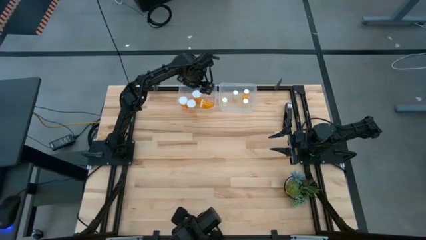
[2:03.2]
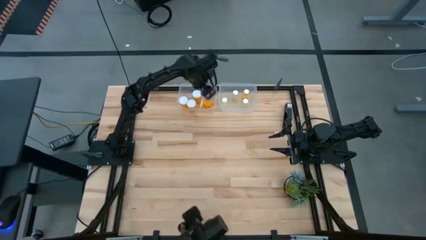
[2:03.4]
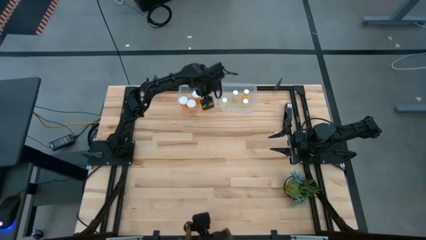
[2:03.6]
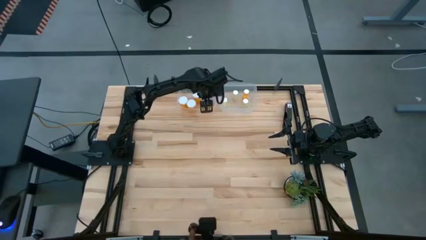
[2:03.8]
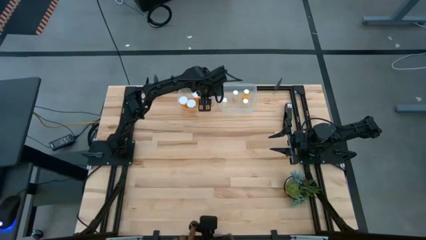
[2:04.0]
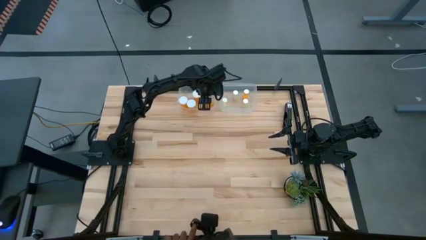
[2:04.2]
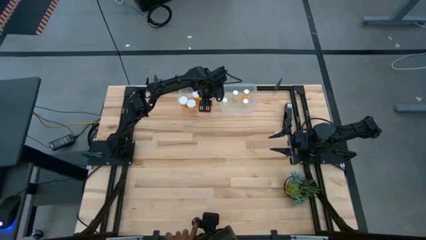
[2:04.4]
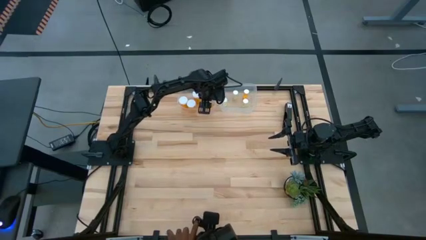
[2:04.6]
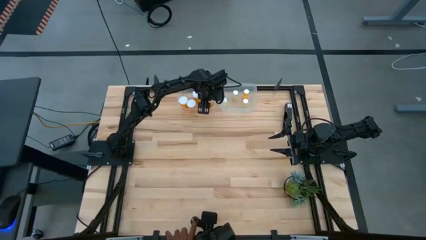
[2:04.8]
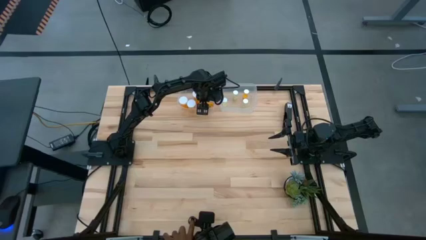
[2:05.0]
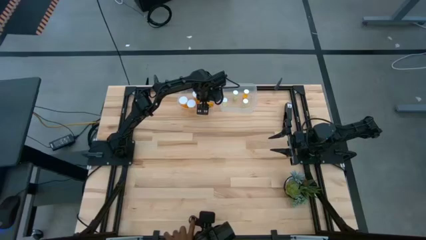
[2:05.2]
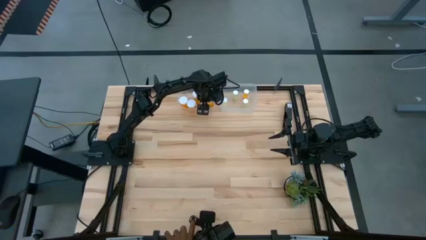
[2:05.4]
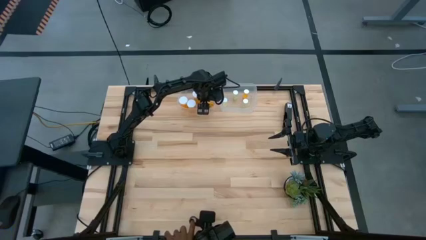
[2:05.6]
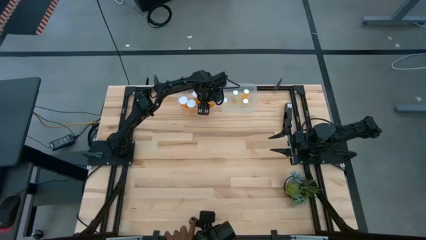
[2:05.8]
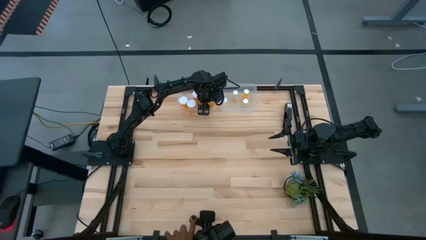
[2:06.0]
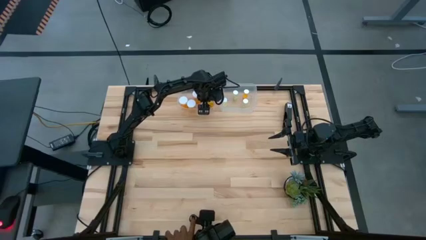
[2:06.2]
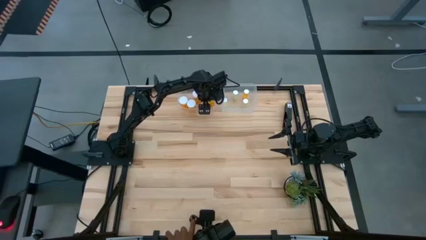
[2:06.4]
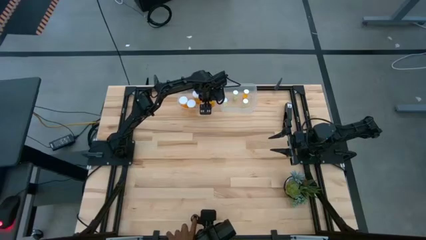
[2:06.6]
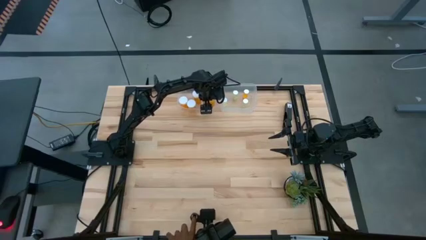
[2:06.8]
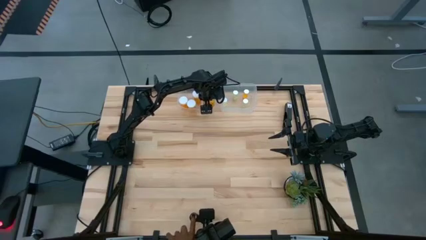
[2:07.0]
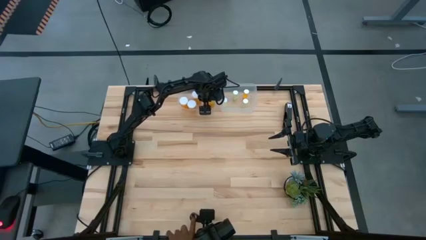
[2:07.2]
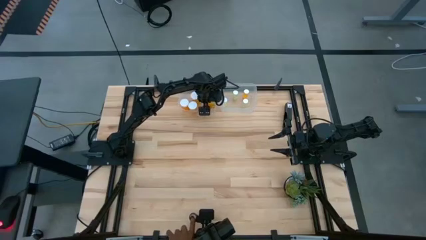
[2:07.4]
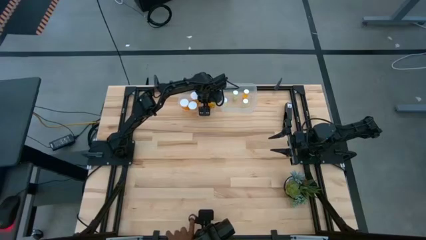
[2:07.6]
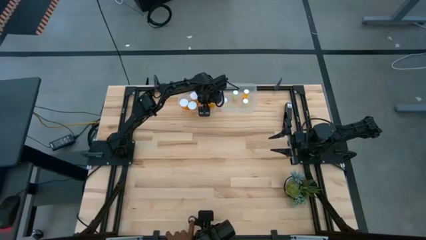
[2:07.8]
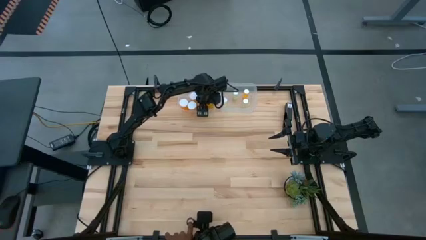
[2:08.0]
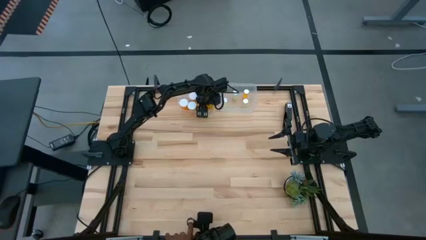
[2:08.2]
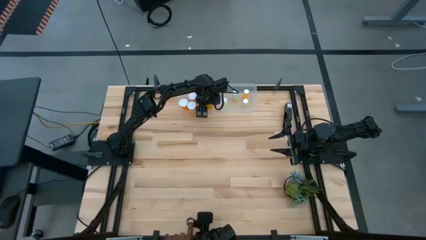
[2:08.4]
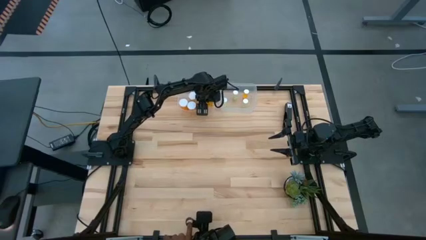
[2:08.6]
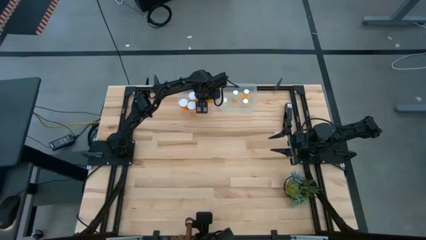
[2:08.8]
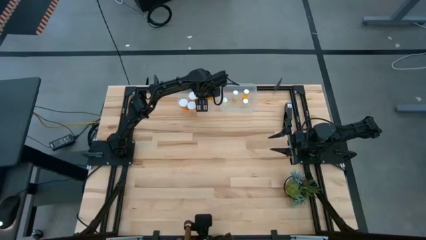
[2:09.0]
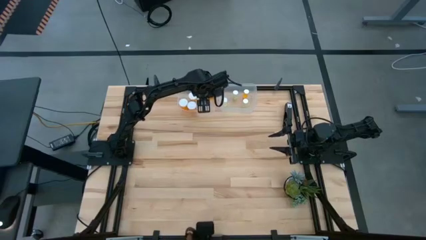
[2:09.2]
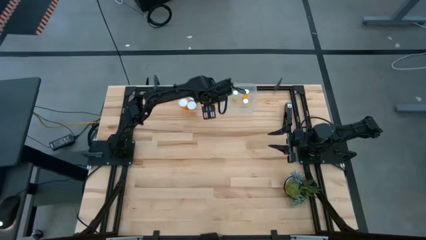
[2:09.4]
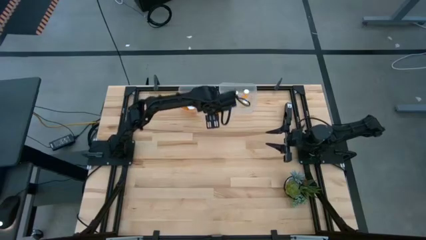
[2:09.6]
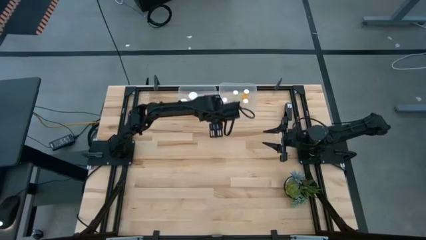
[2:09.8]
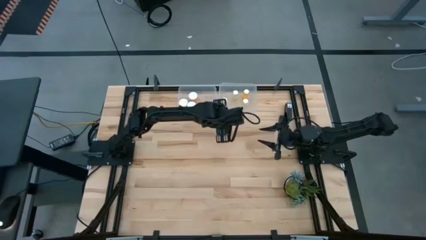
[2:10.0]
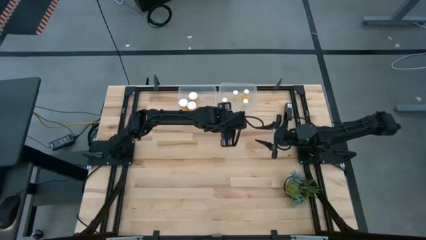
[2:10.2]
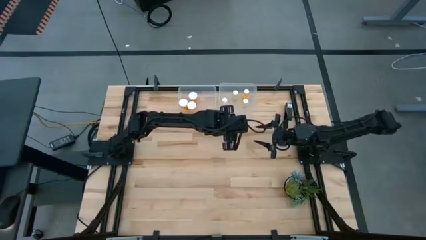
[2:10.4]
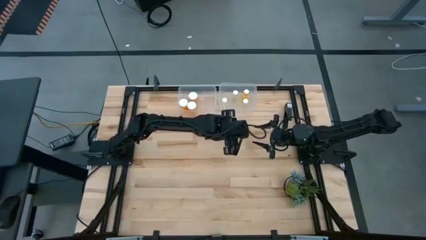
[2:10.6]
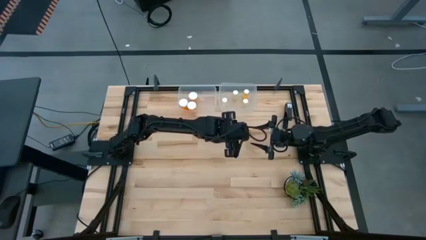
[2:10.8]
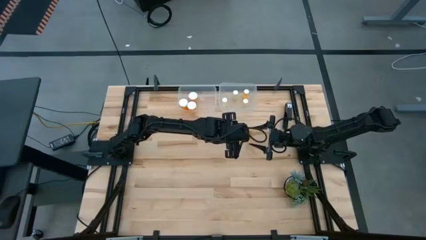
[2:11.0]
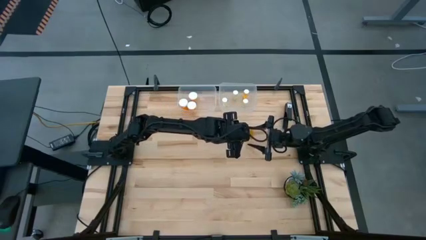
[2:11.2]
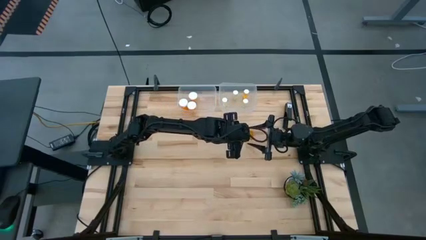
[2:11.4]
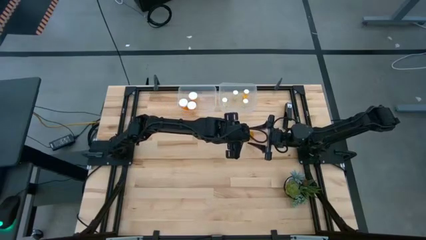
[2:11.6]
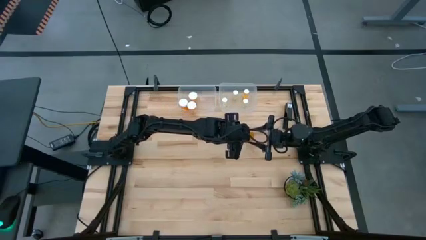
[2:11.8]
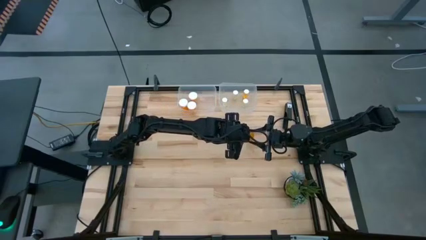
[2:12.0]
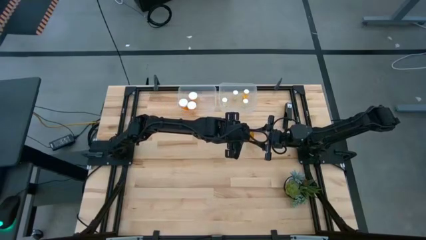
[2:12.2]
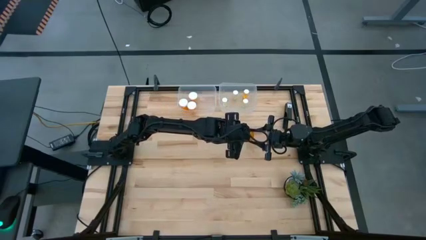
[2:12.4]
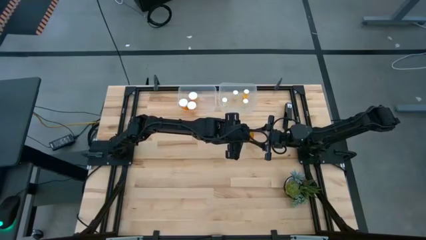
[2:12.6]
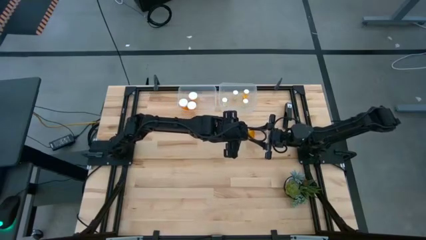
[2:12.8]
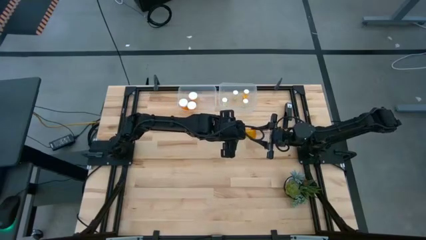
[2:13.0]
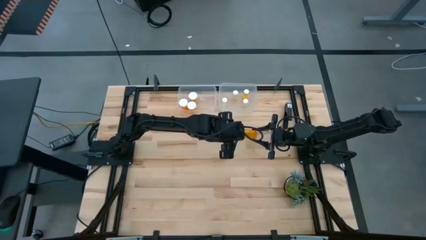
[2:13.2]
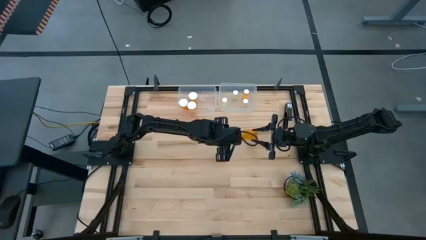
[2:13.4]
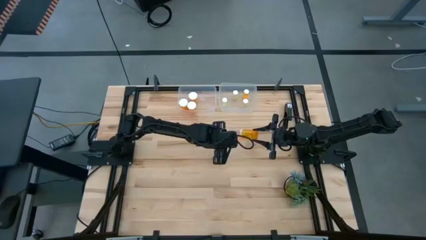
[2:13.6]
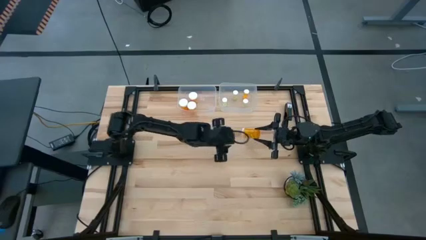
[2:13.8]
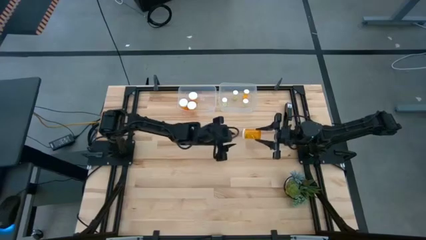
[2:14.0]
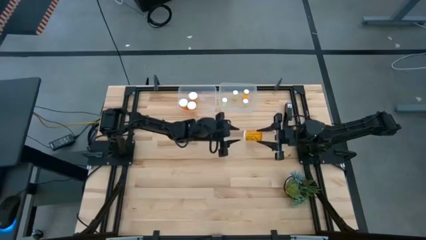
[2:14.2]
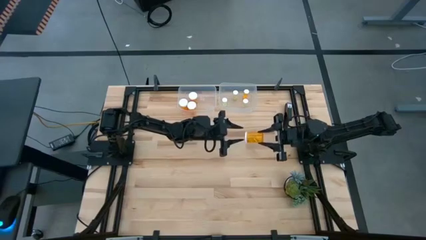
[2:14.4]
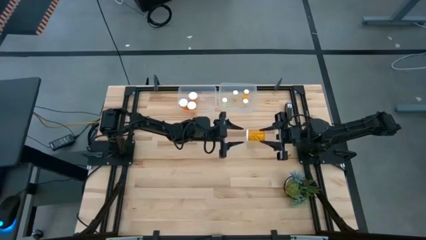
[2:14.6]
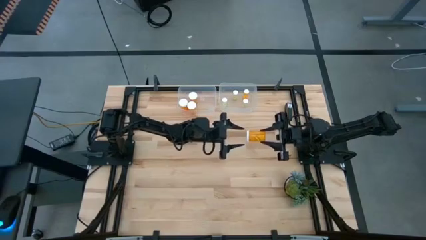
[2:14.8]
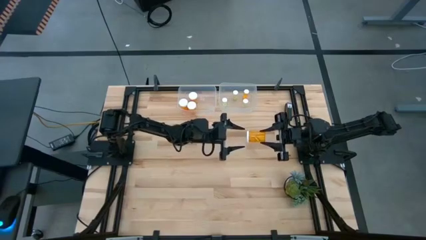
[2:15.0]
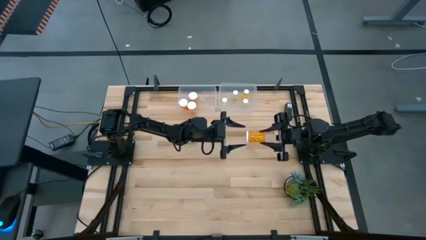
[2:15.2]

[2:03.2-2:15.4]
Task: Pick and place medicine bottles into bin by pill shape (circle, oval)
Adjust the large orange pill bottle on the transparent bin

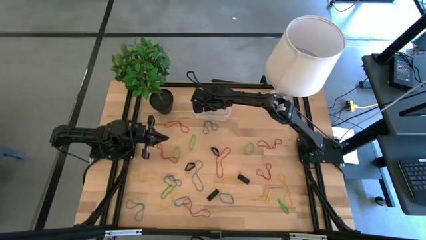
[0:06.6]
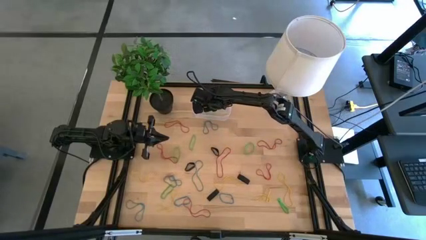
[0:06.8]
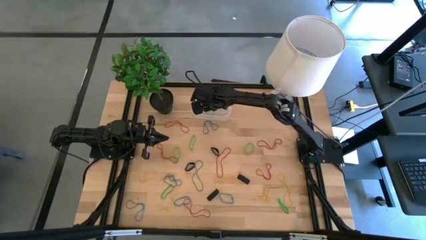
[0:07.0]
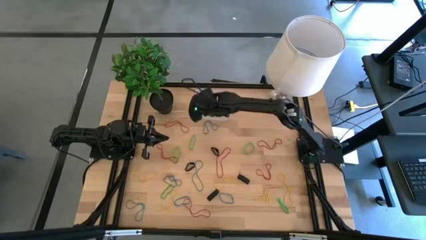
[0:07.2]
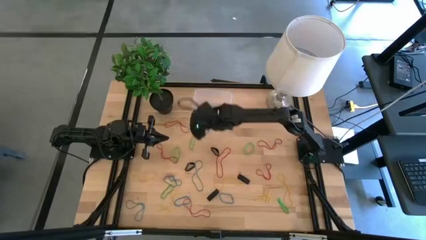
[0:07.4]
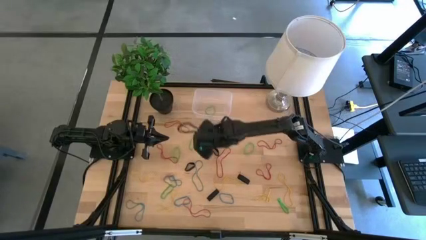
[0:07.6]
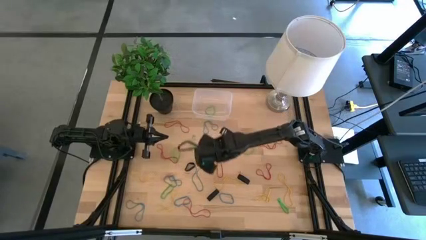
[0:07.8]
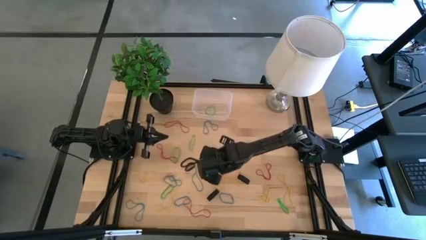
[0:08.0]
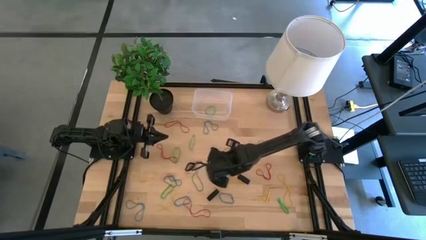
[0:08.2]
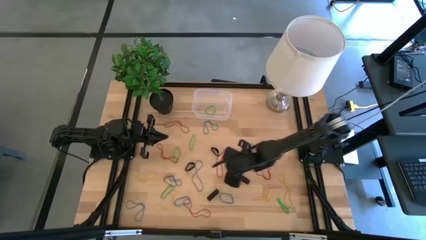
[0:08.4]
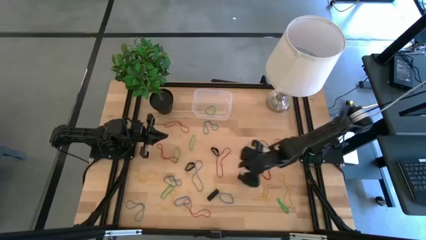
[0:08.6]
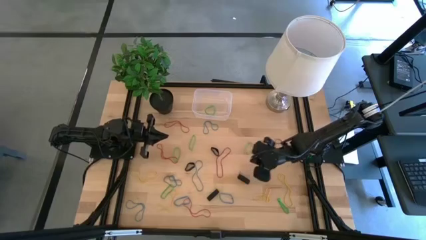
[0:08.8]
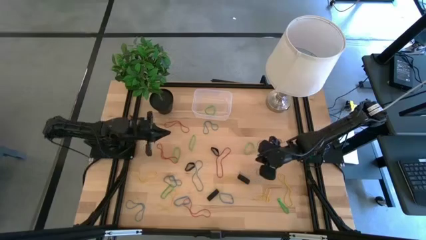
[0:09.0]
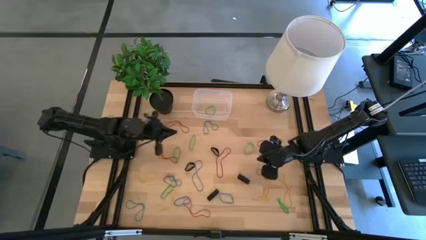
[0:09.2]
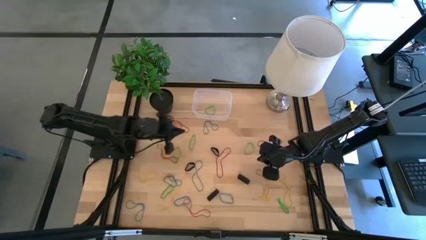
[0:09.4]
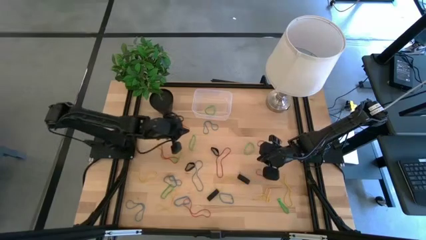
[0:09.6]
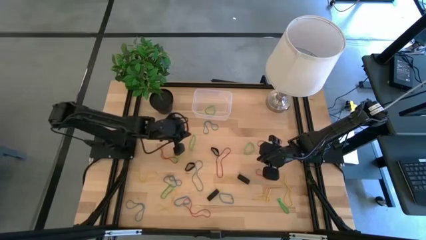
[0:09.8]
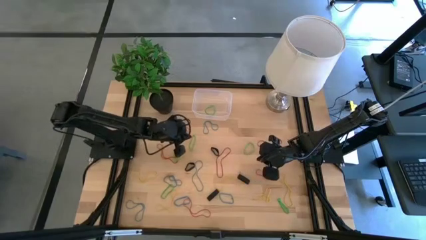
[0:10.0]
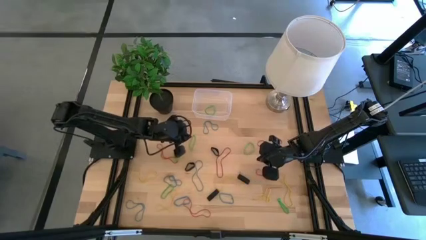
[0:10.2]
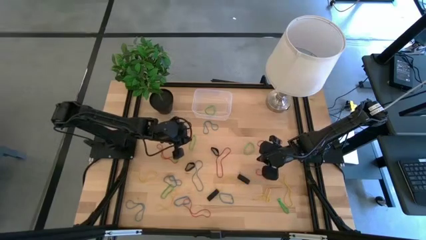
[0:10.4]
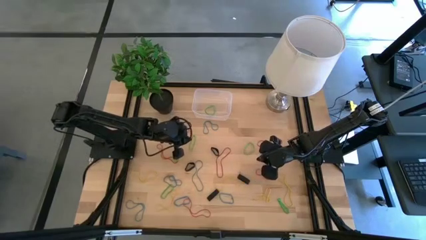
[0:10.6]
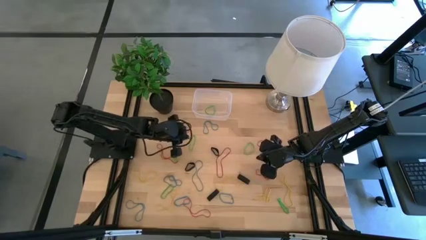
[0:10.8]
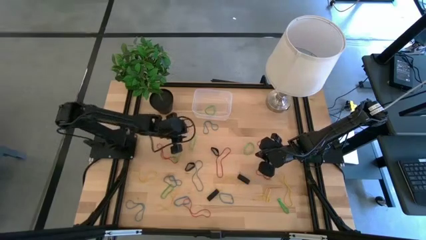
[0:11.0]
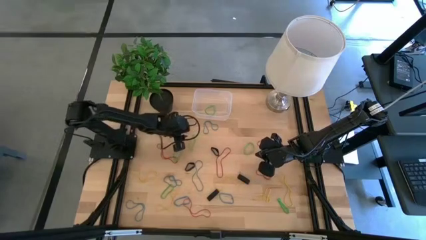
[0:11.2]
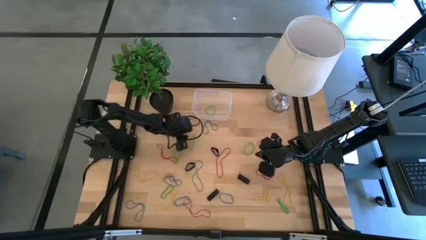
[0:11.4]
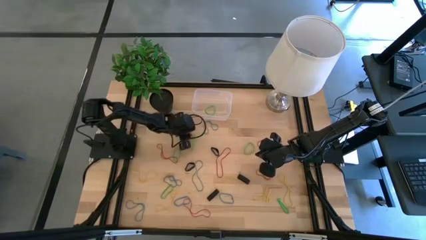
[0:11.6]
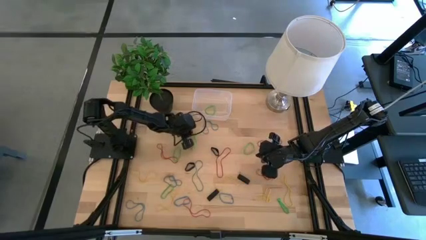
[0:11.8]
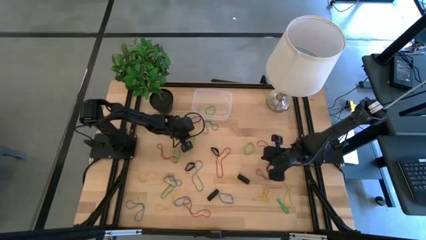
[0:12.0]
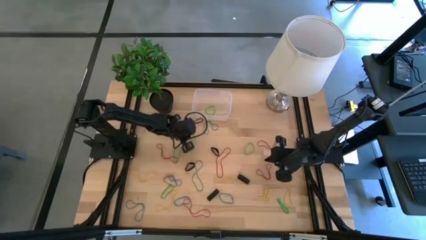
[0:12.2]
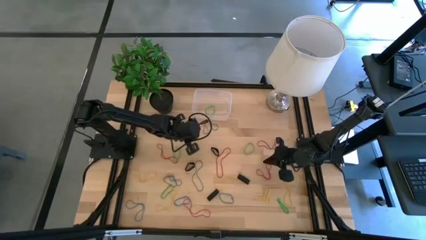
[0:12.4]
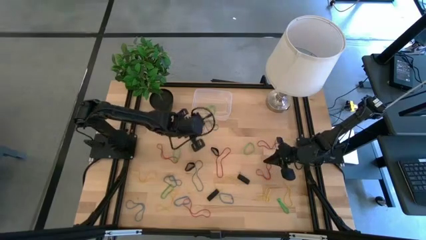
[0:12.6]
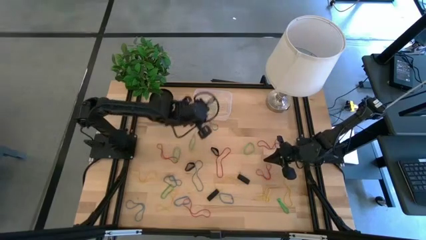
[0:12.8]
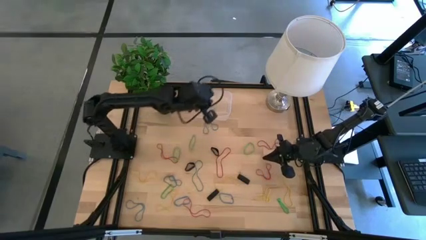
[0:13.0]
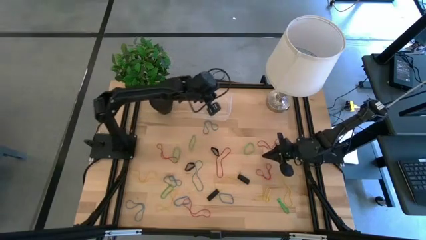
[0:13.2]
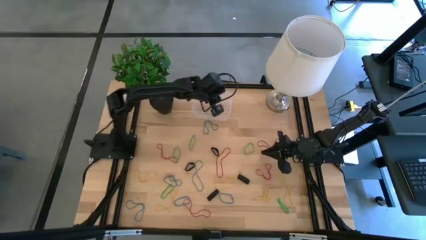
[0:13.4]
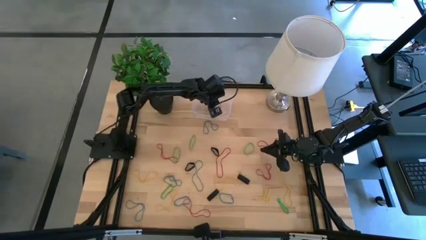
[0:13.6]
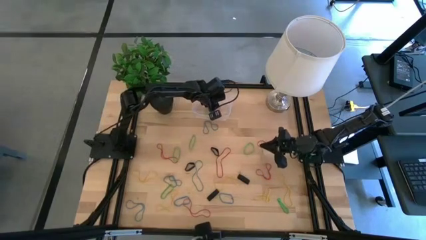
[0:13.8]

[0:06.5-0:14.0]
Task: Pick and place rubber bands into bin
Put the red rubber band into the transparent bin
